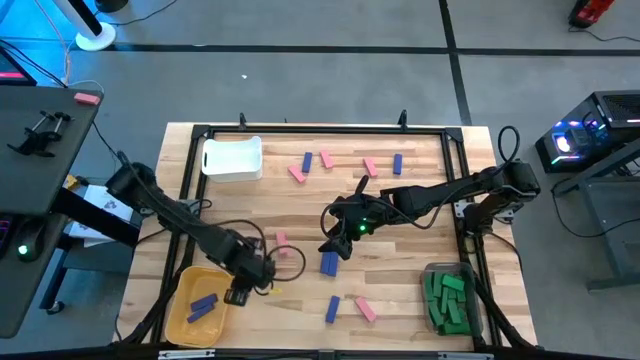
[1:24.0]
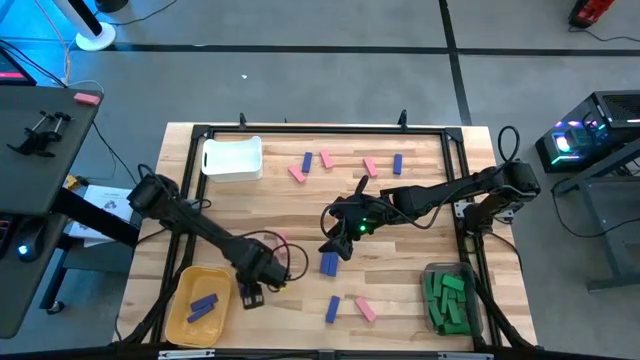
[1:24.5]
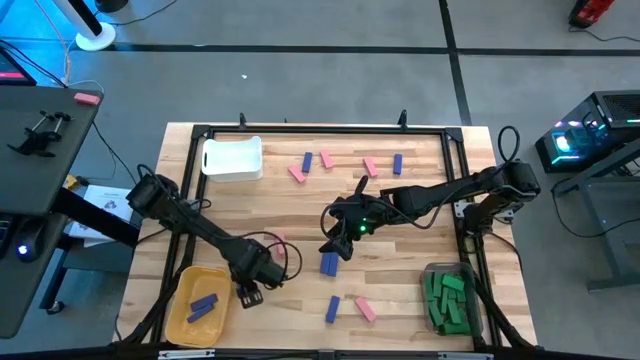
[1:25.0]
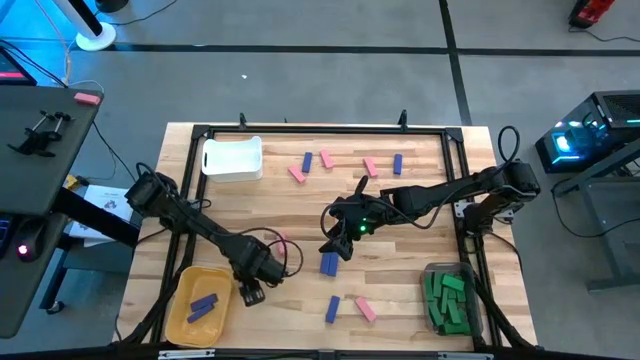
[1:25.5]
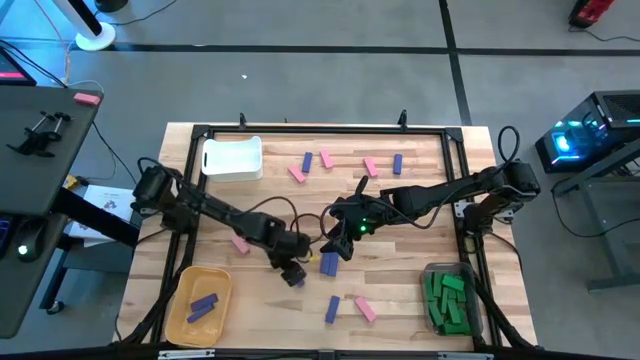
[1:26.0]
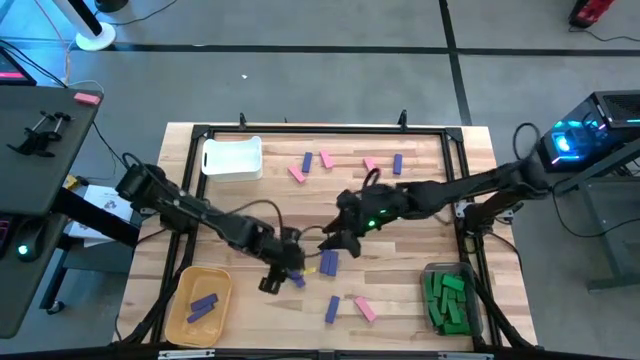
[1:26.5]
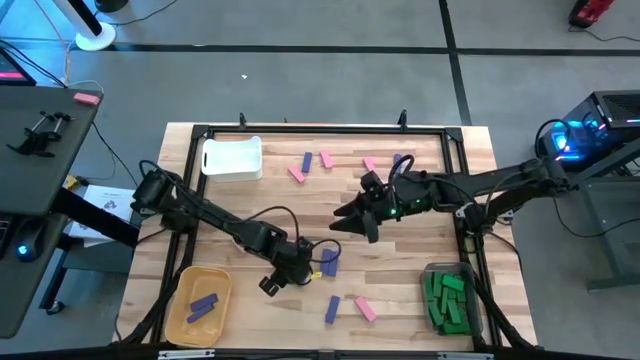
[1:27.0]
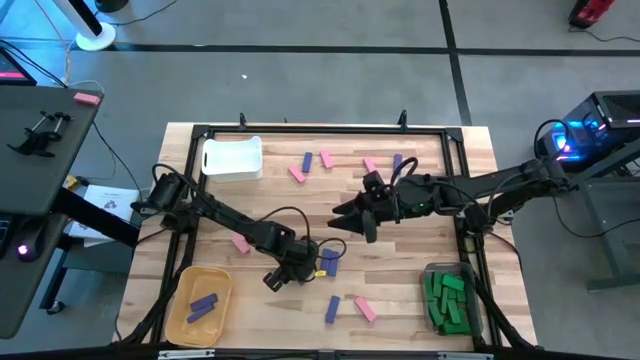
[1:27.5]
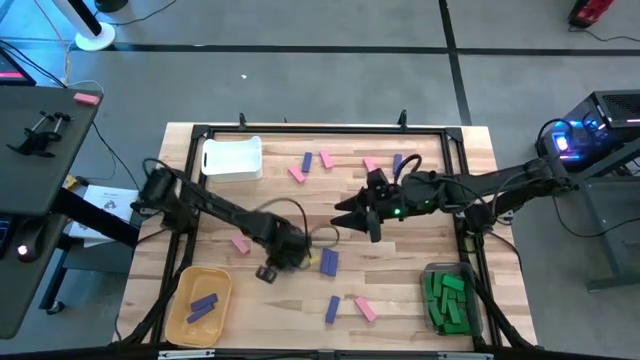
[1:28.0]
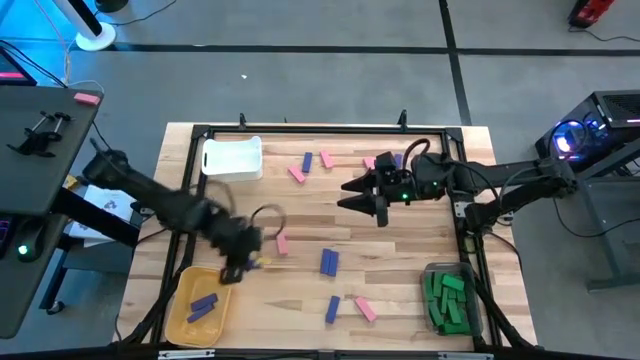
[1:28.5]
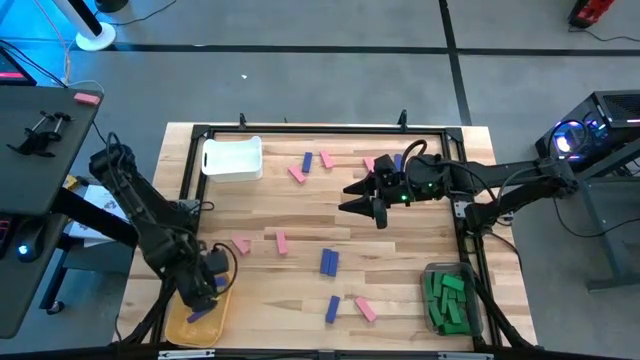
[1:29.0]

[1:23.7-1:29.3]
Task: Sort blocks
Put the purple block into the yellow bin

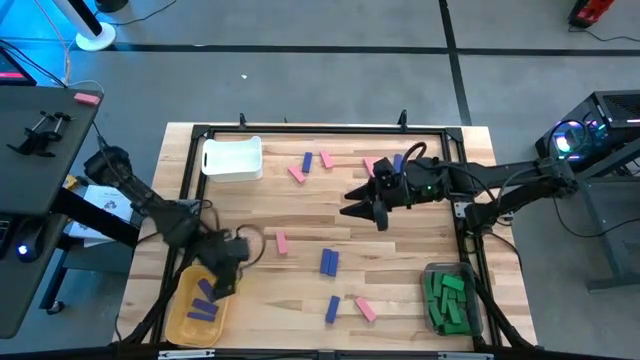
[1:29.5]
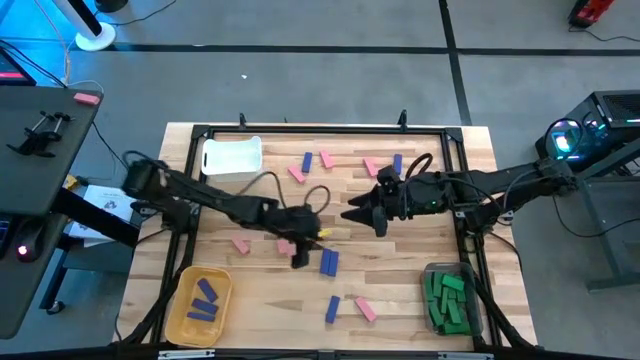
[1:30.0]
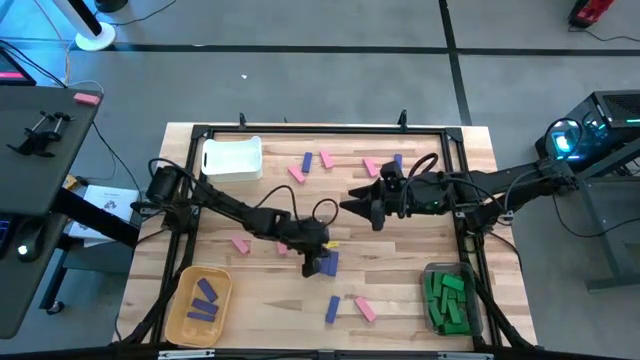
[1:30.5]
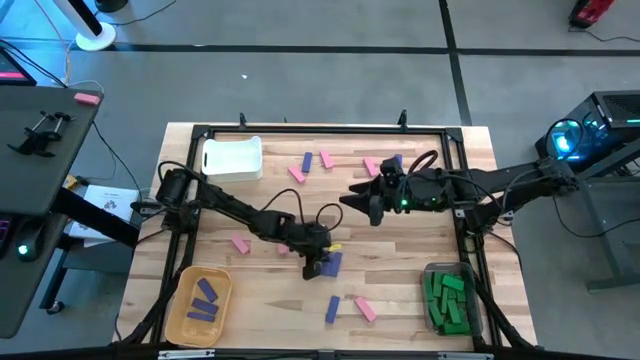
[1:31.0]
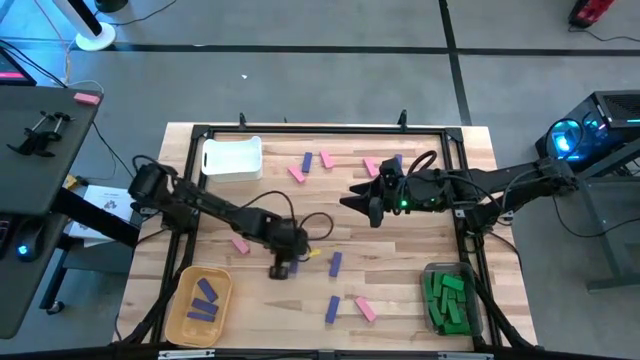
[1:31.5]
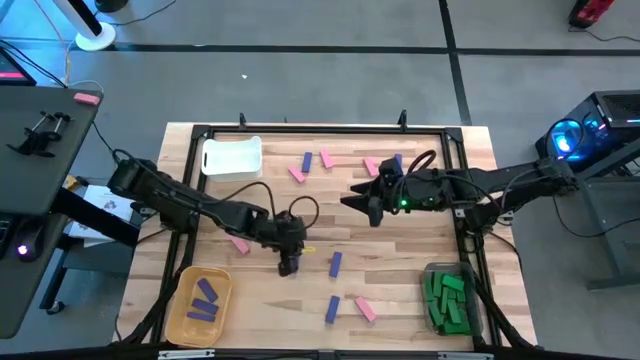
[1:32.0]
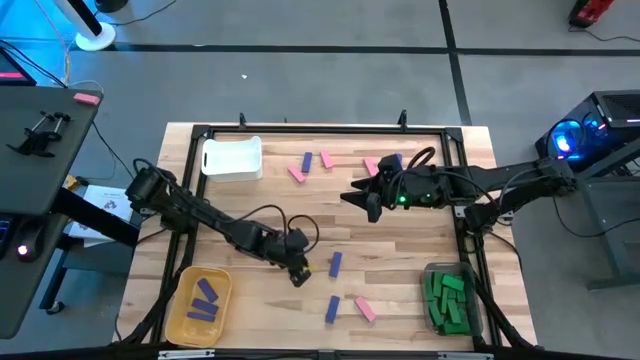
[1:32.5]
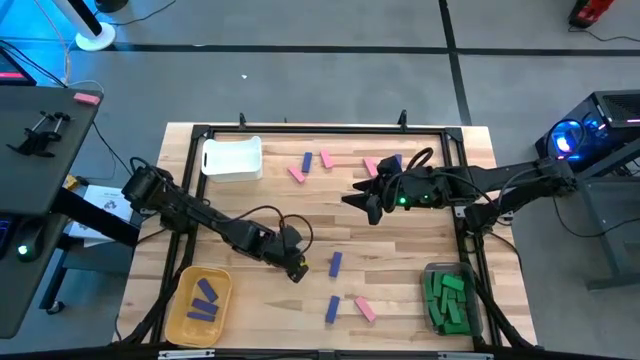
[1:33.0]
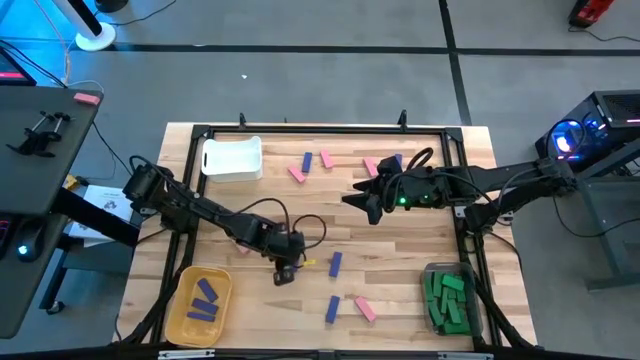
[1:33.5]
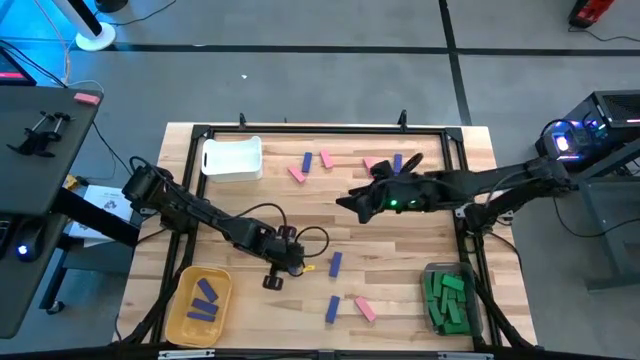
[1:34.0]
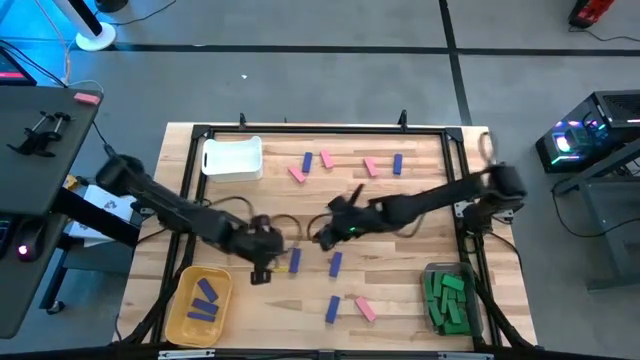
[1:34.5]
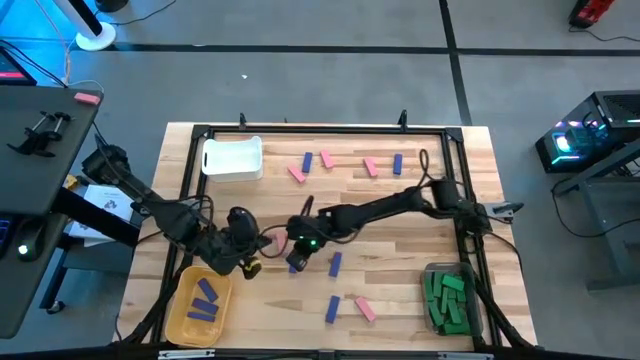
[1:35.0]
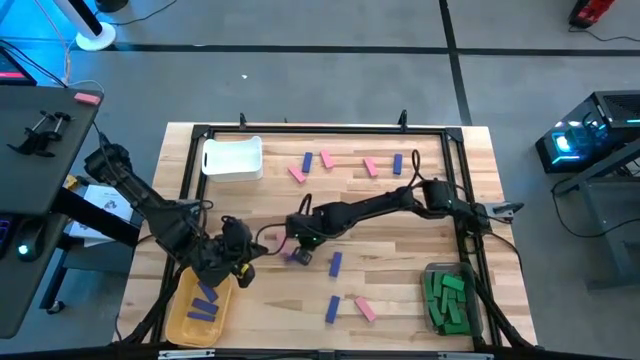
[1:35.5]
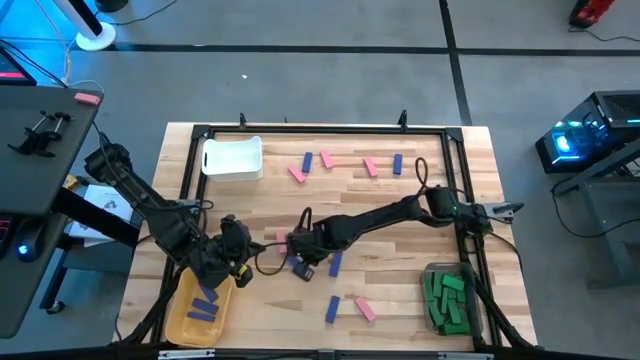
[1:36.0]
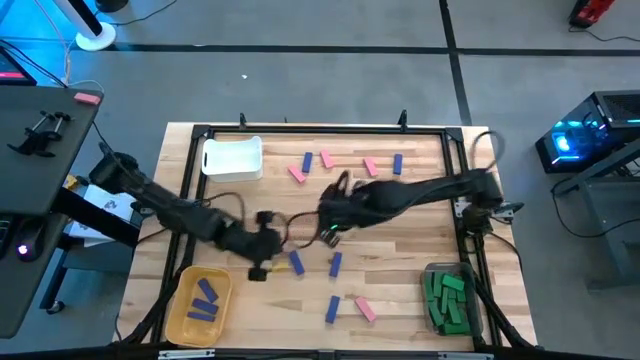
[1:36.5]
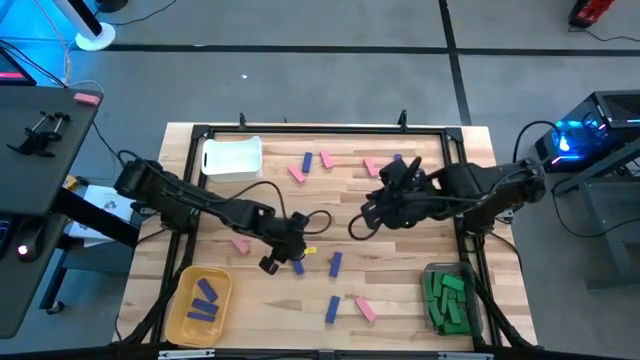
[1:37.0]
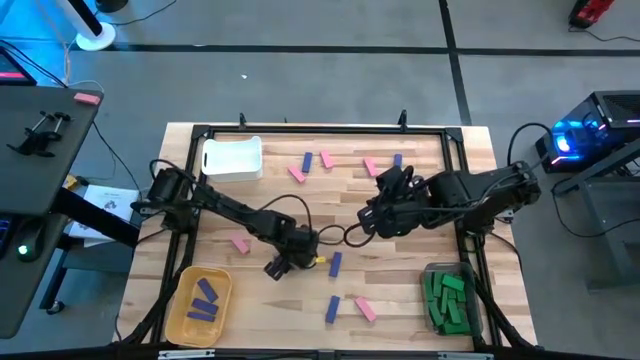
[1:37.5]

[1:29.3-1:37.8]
Put the purple block into the yellow bin

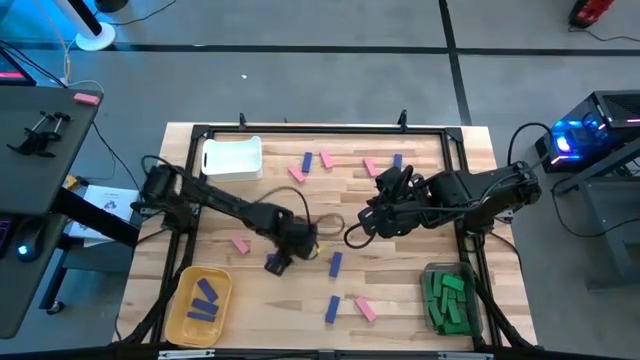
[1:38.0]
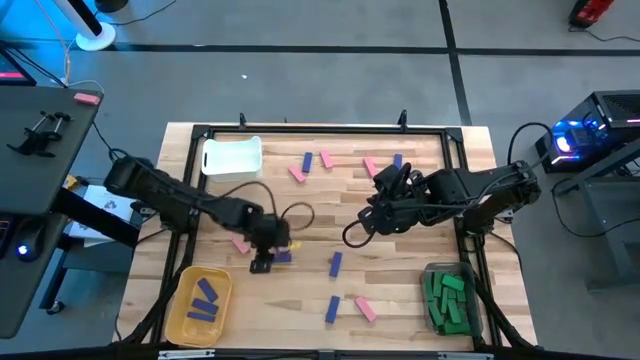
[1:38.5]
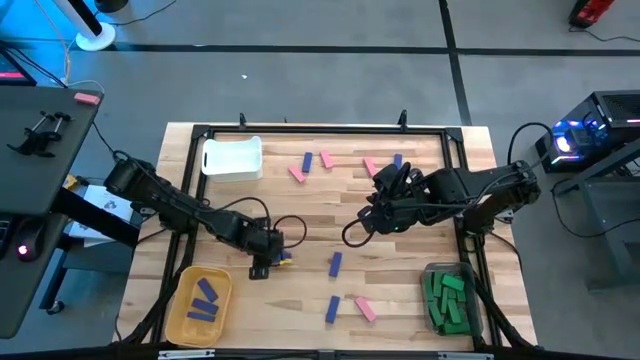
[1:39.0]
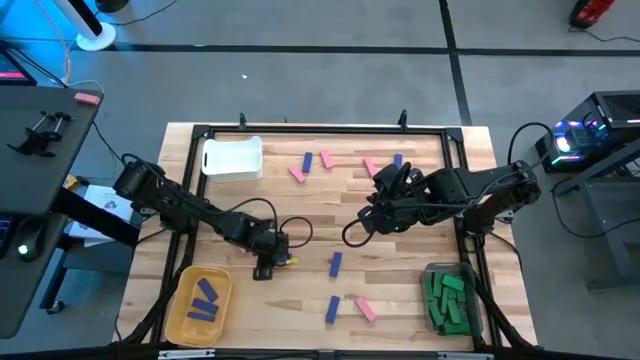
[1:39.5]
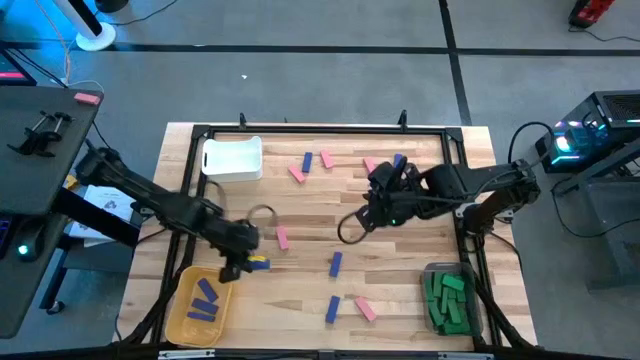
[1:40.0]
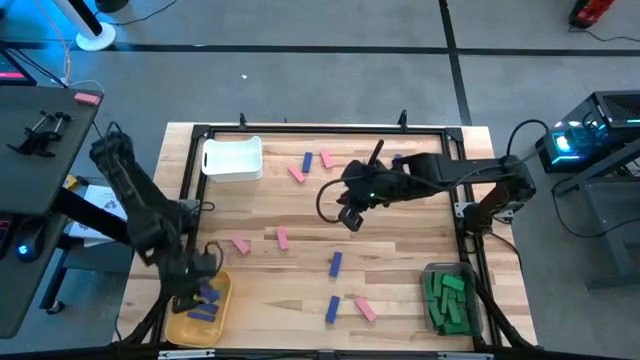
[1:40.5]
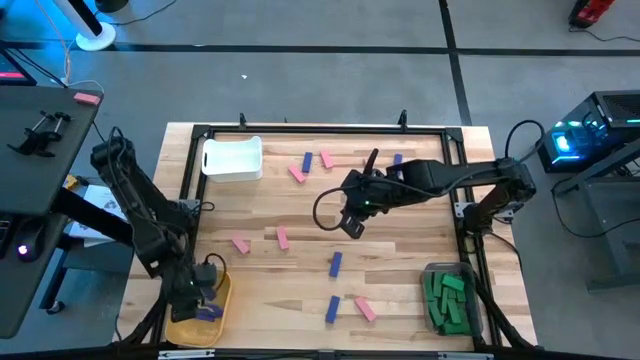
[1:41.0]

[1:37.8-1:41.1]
Put the purple block into the yellow bin

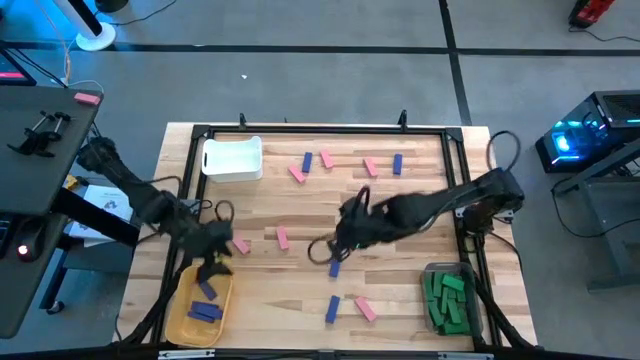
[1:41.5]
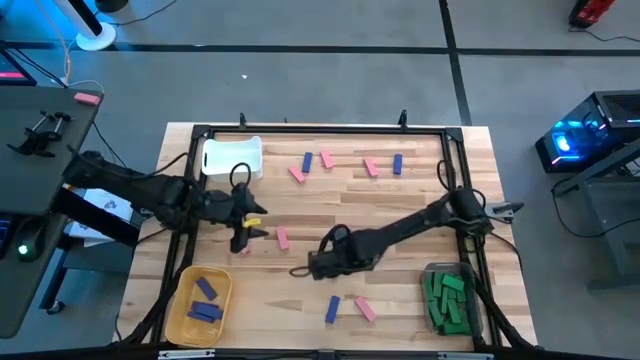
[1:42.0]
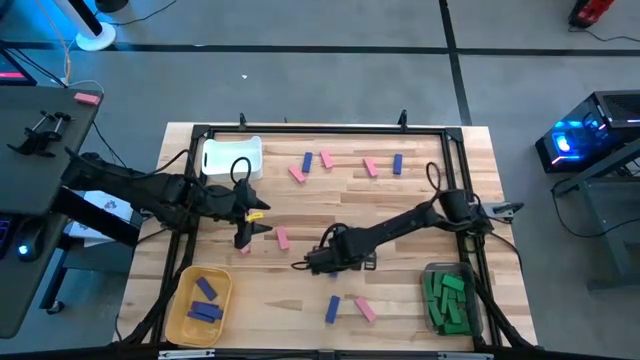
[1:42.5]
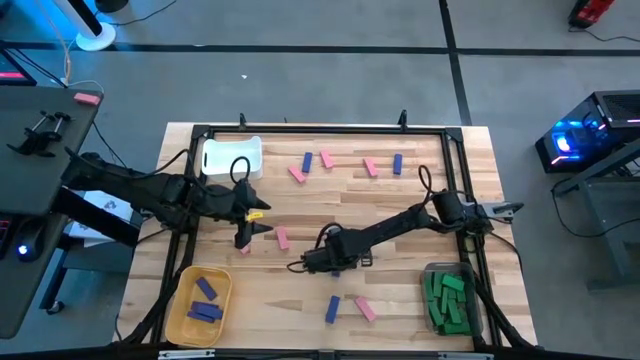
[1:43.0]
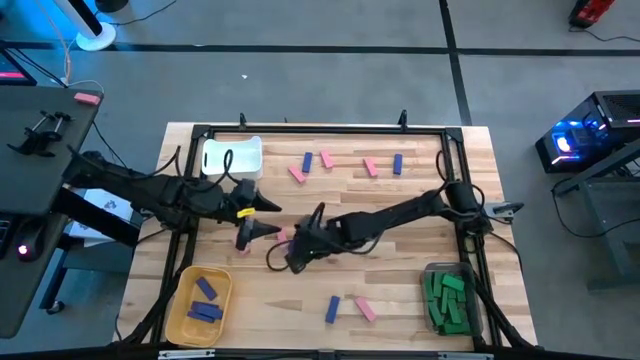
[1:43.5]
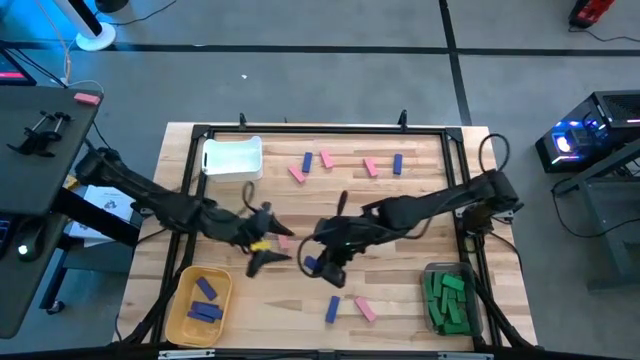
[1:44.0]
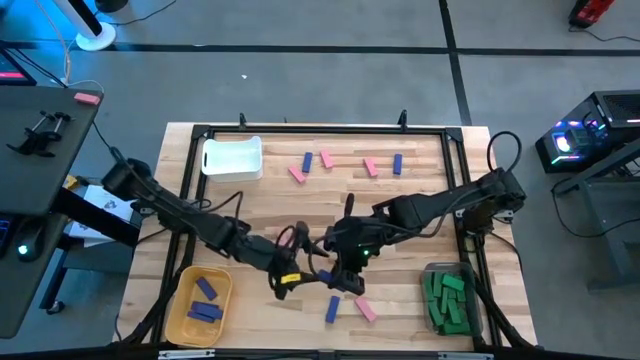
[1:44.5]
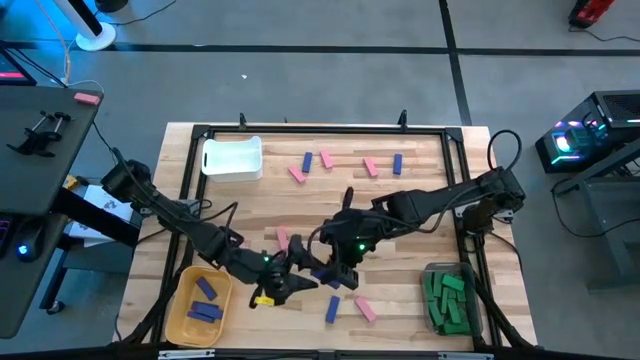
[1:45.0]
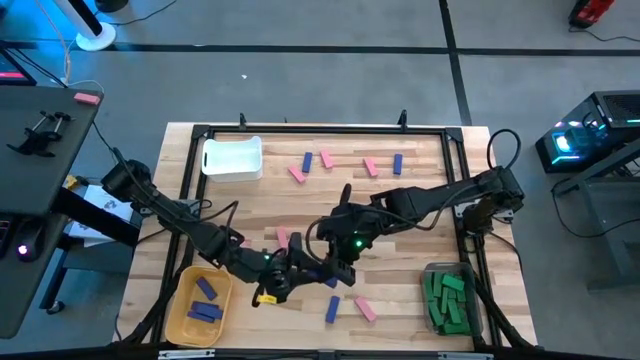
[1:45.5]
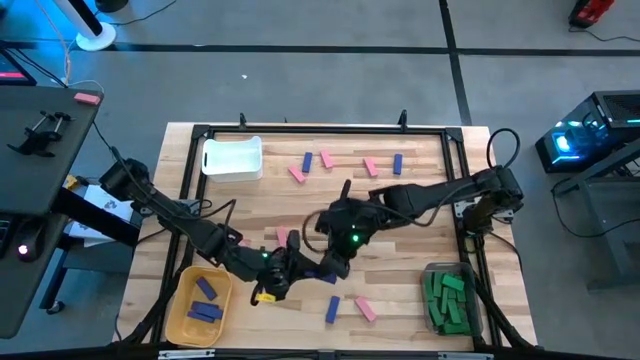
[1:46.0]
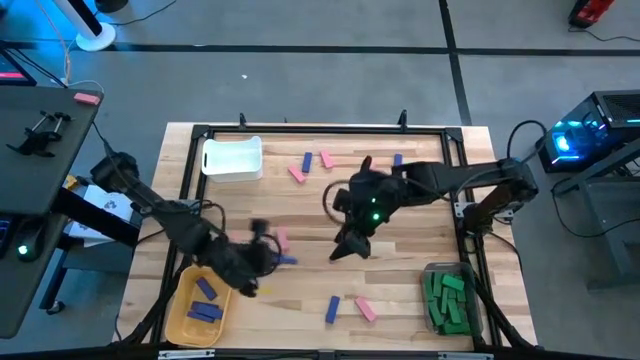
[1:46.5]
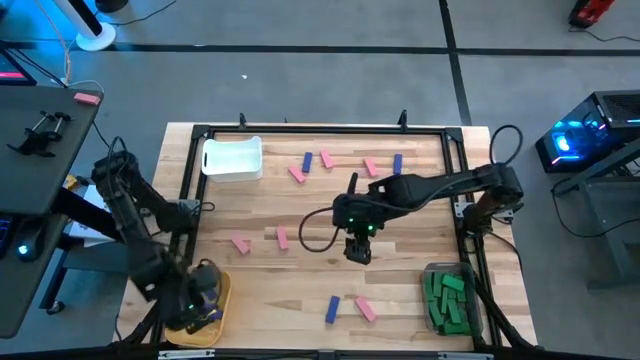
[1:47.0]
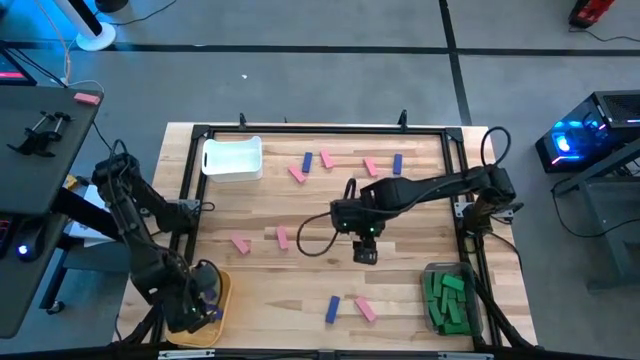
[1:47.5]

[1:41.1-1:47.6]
Put the purple block into the yellow bin
